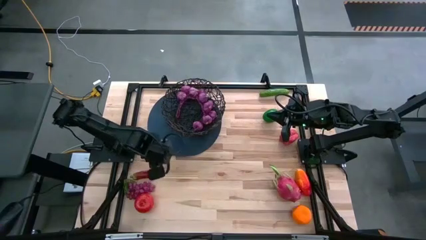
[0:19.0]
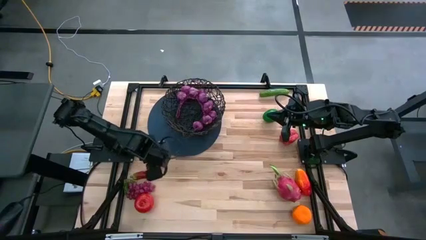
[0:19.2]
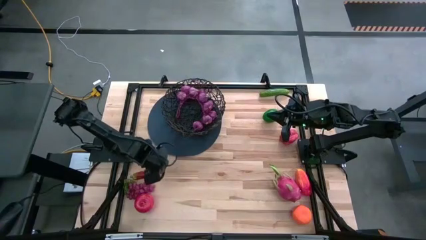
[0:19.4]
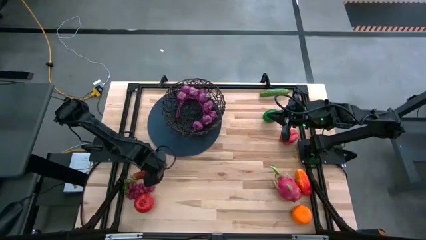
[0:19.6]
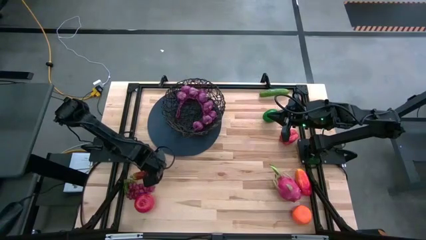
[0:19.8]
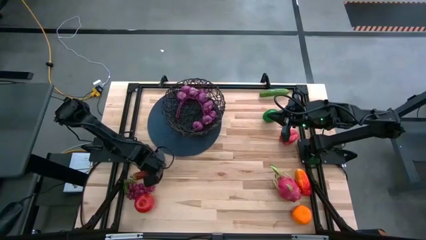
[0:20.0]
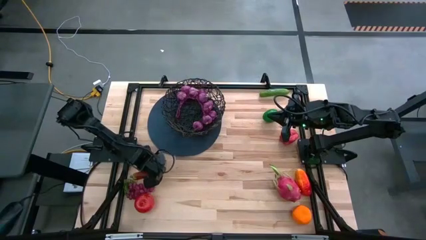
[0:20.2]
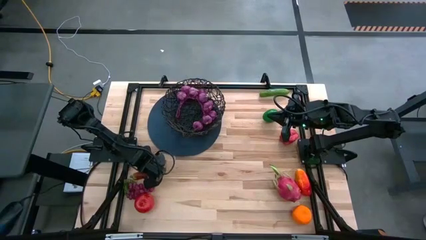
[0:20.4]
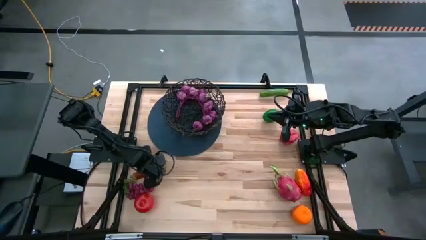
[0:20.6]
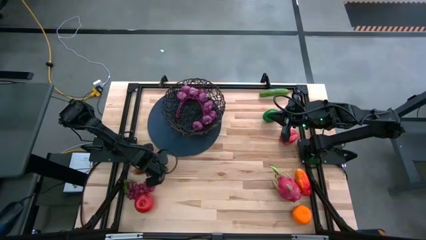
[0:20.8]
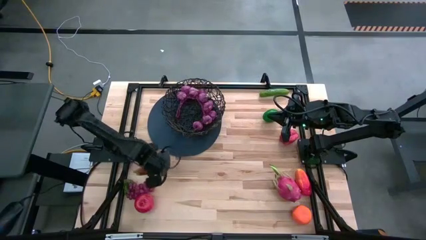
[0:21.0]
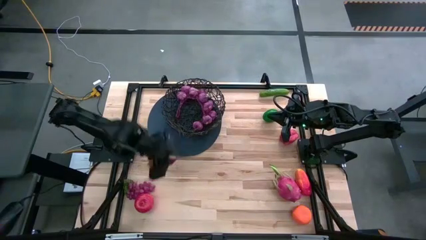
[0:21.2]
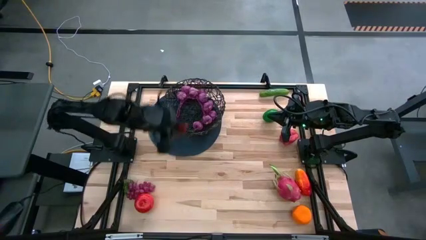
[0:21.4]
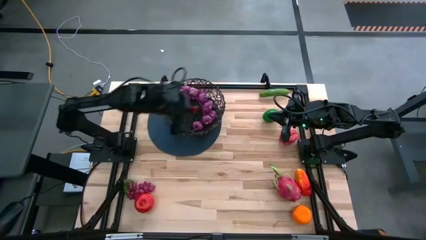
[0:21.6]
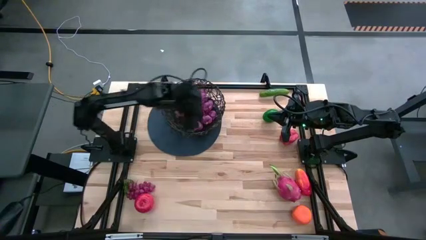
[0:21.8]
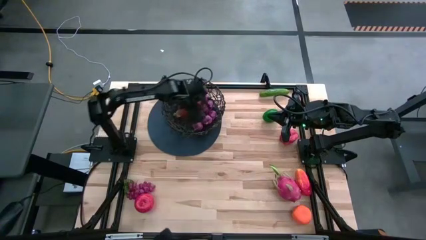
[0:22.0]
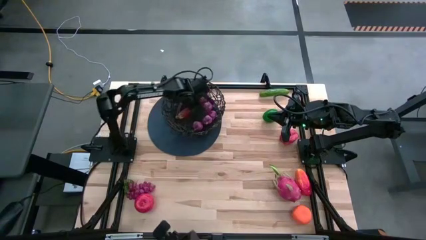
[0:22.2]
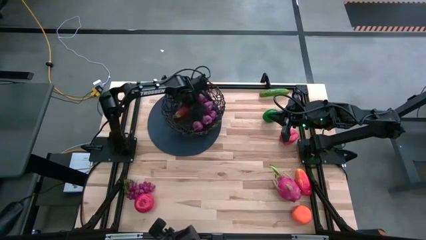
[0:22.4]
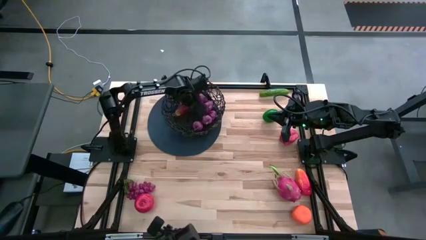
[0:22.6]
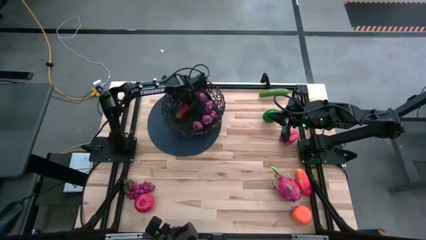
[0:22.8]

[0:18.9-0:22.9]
Task: Build produce basket
Put the red chili pepper into the black basket

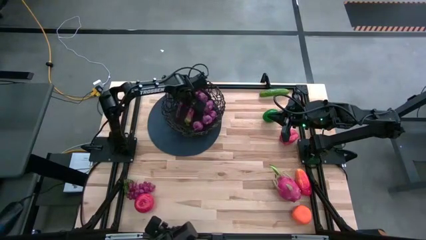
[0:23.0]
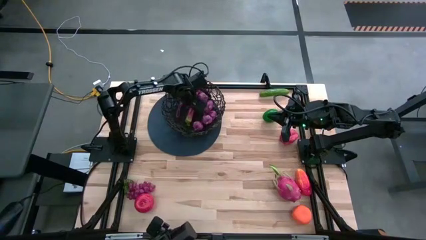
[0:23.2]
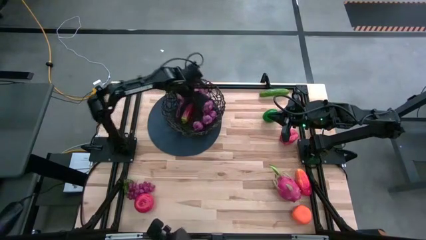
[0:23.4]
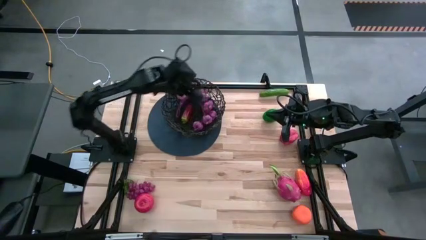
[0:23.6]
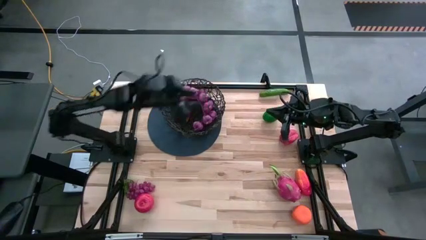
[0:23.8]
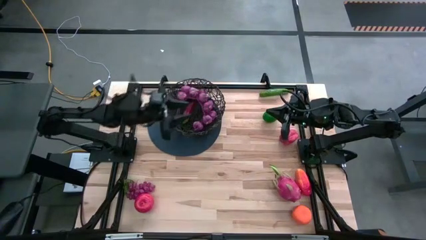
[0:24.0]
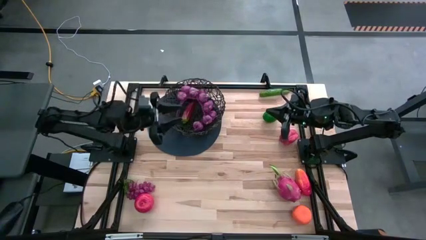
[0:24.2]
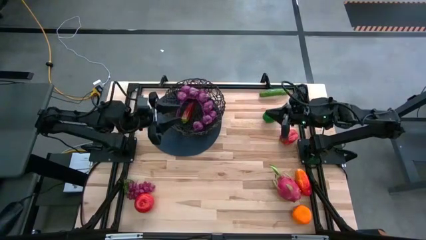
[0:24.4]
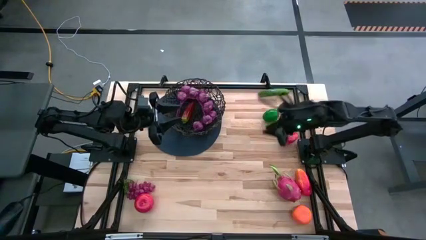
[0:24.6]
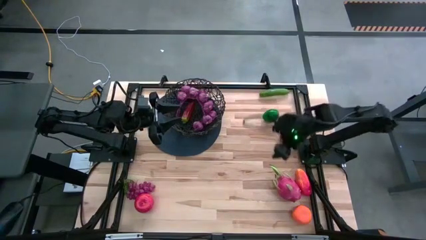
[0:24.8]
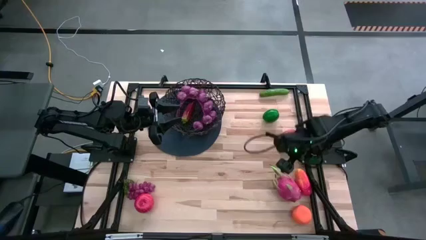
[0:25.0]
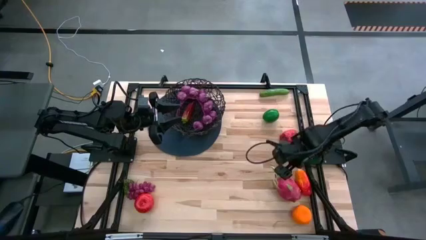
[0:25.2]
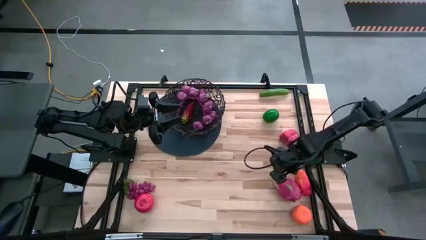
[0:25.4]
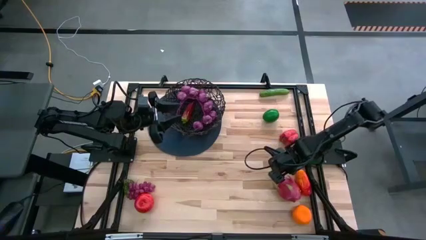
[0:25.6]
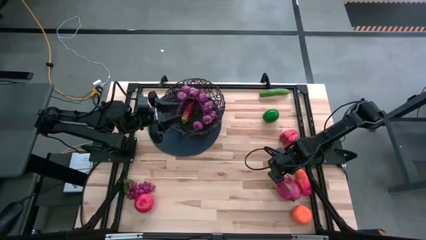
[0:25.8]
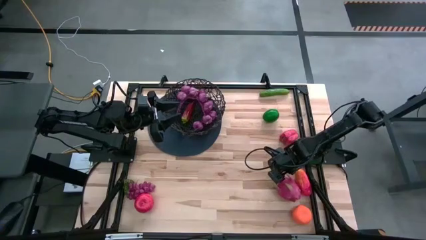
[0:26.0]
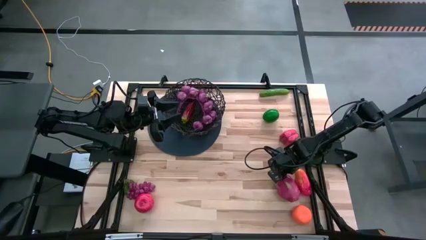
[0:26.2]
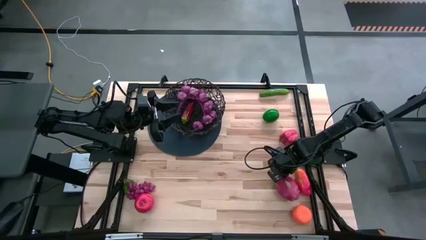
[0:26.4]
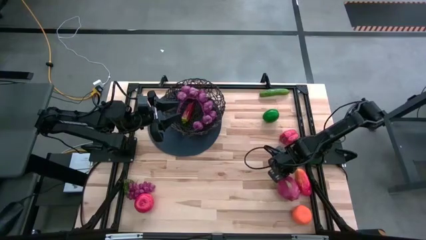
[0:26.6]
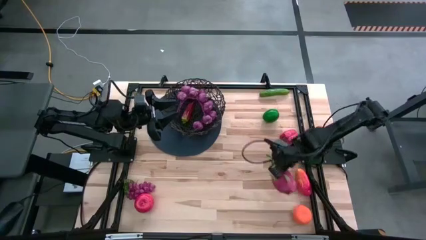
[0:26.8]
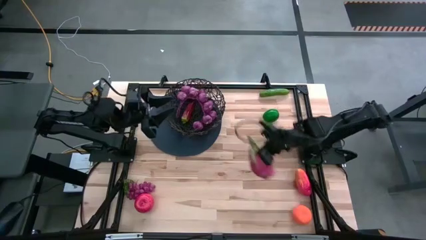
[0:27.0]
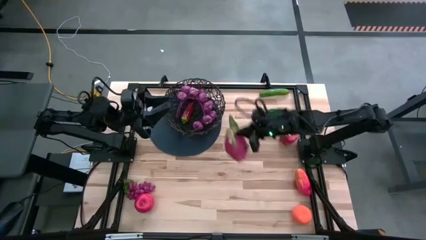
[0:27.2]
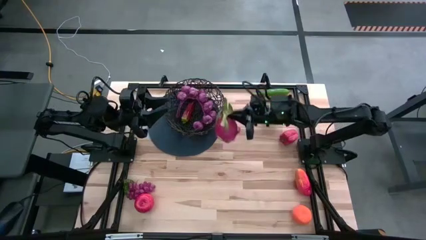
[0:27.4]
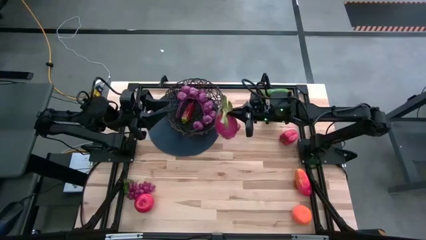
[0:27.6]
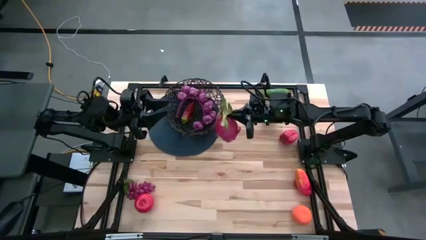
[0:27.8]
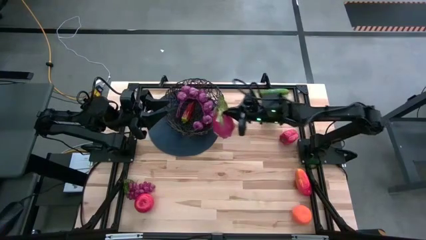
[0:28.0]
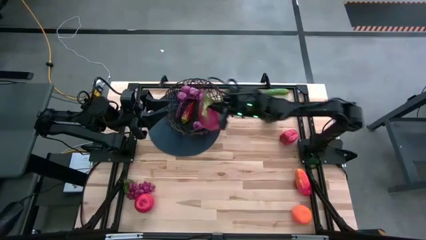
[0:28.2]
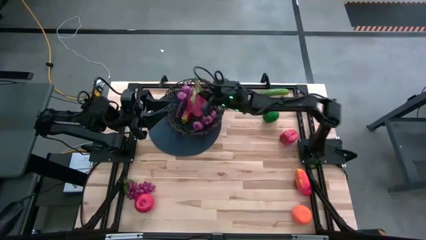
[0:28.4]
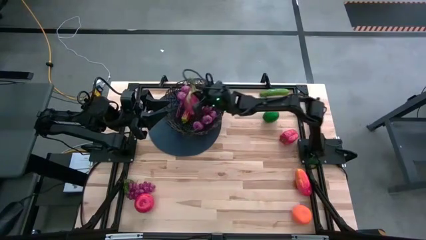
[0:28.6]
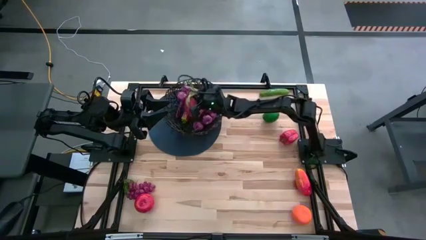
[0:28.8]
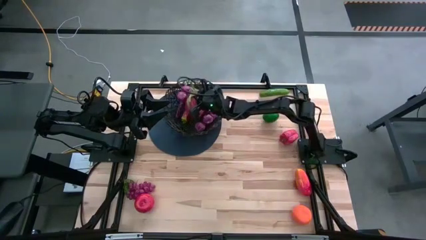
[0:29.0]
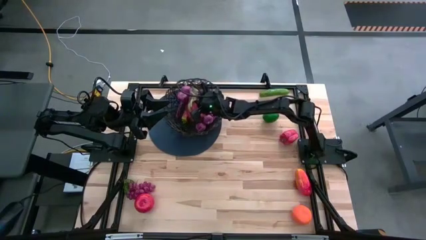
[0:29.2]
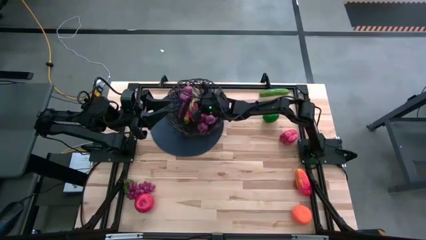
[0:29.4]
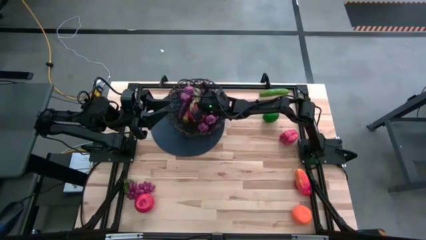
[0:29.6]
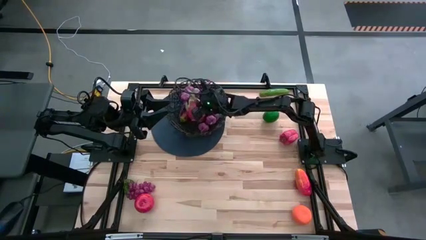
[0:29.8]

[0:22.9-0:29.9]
Put the dragonfruit into the black basket

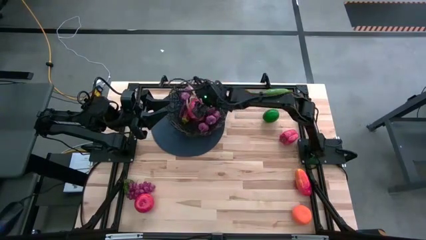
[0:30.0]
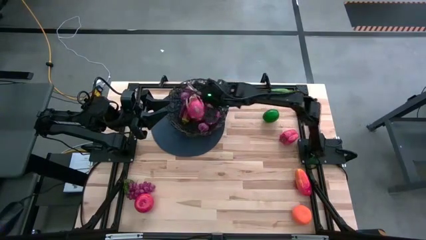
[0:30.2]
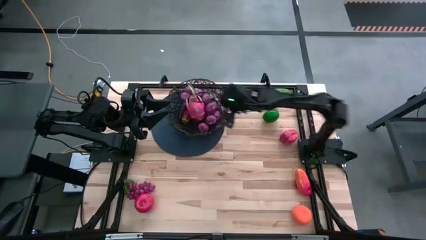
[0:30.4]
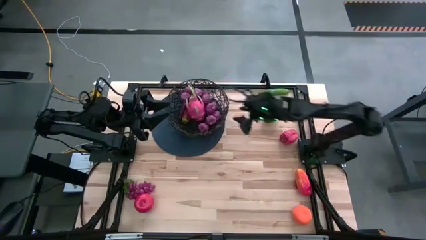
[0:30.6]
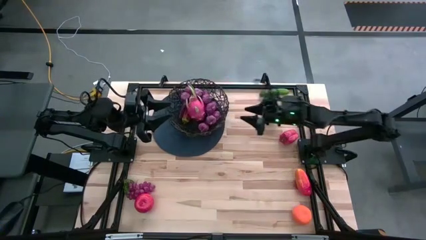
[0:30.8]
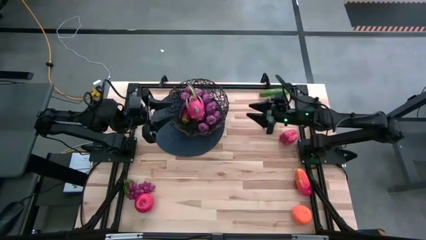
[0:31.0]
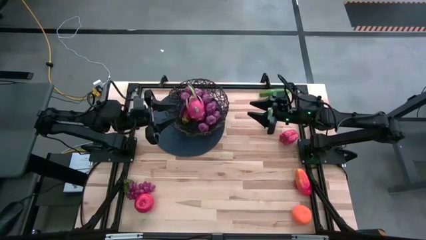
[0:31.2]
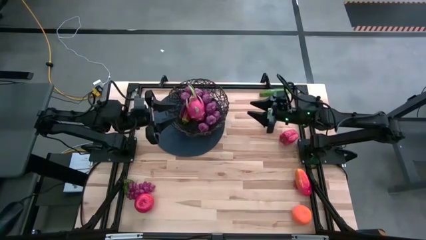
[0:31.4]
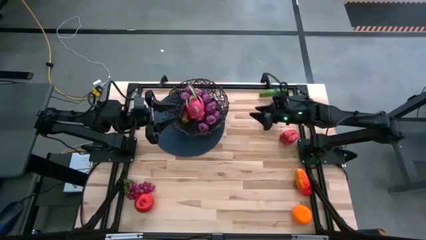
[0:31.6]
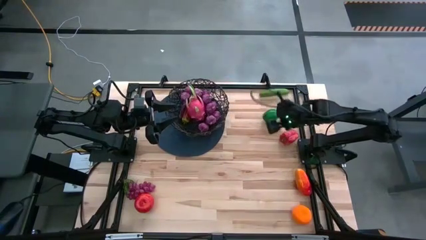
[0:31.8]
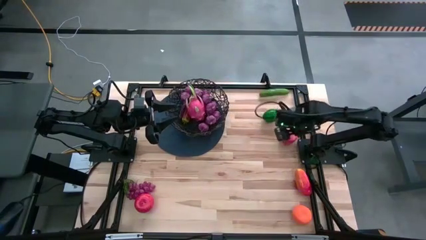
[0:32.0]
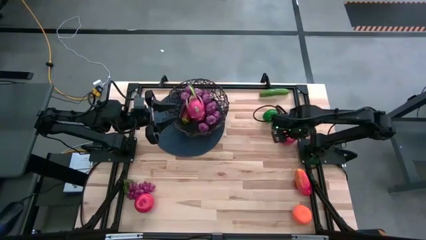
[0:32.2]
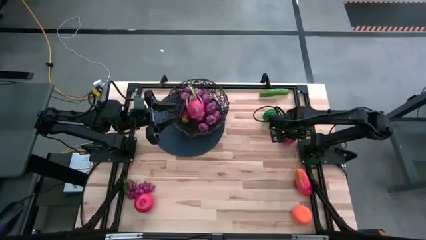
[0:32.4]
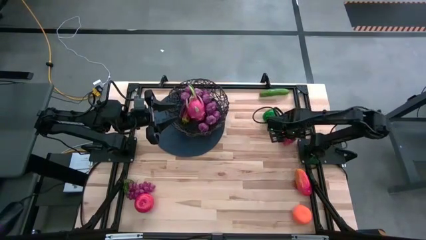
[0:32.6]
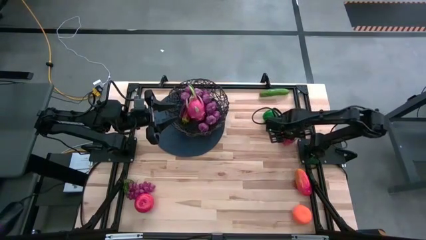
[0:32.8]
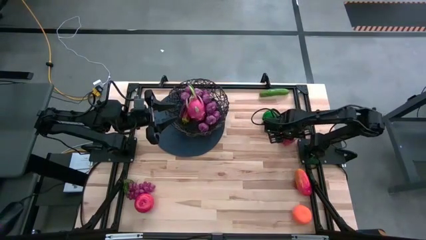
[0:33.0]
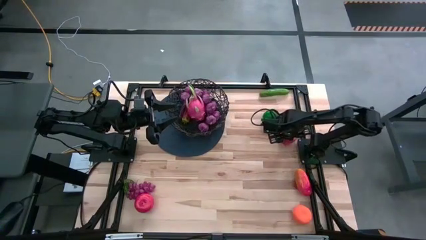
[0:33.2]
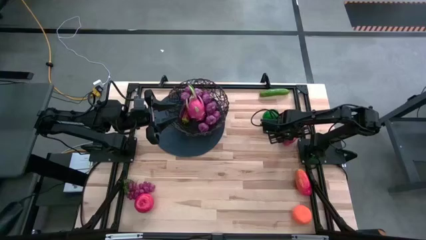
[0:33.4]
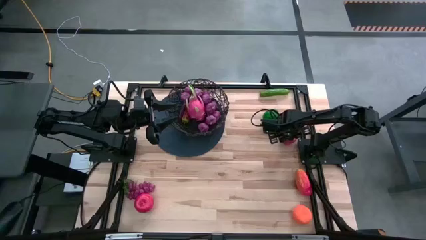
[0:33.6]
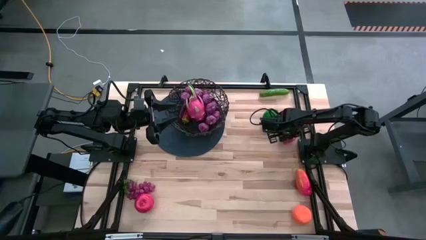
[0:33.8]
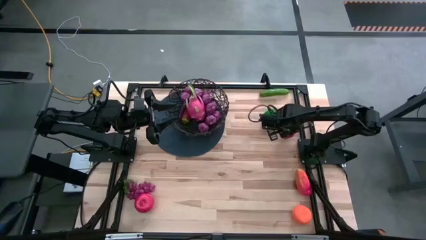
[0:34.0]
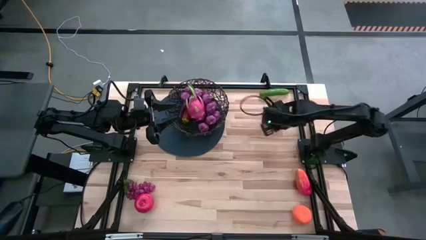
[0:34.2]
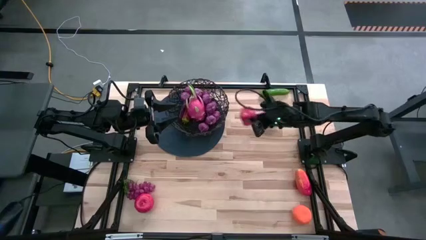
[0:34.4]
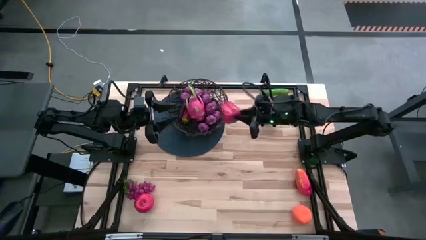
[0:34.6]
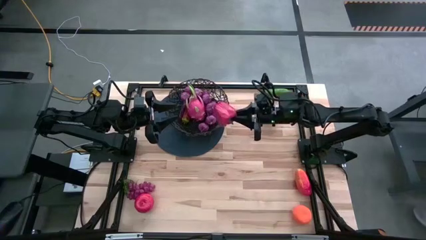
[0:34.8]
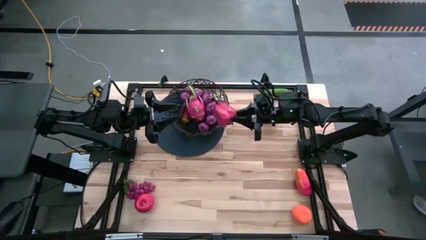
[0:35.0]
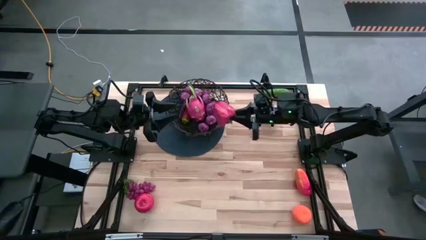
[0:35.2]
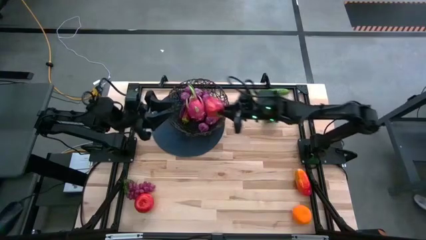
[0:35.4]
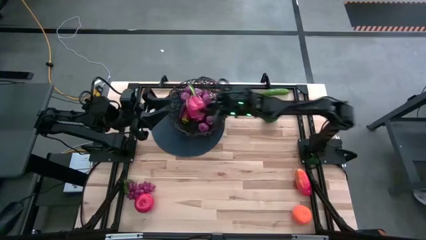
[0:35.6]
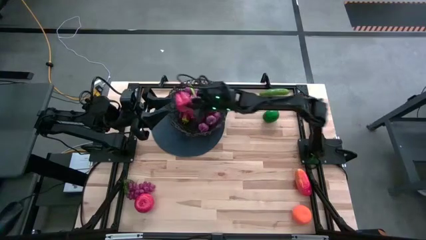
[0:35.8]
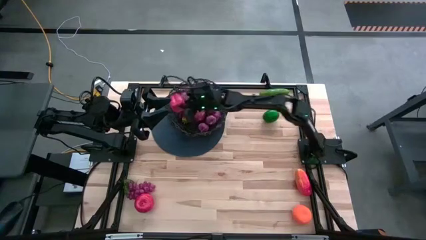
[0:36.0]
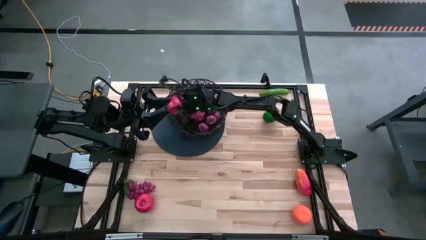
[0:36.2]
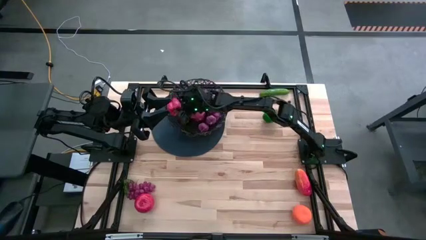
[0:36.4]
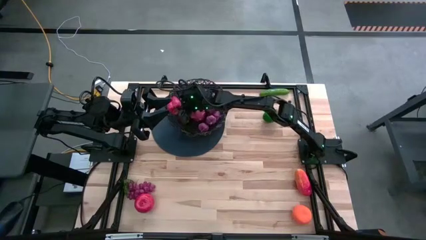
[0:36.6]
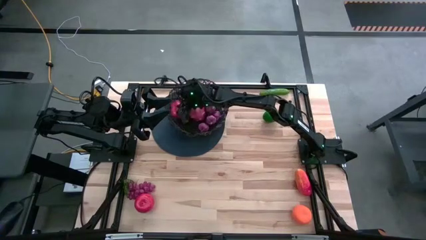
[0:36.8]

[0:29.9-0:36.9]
Put the red bell pepper into the black basket
